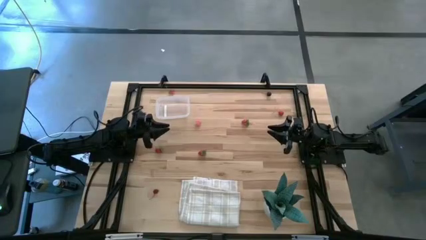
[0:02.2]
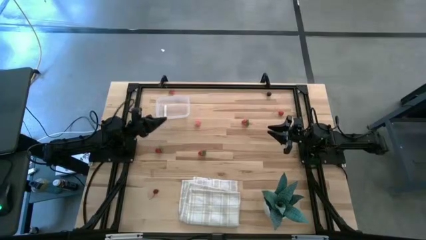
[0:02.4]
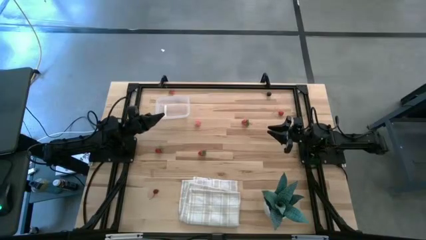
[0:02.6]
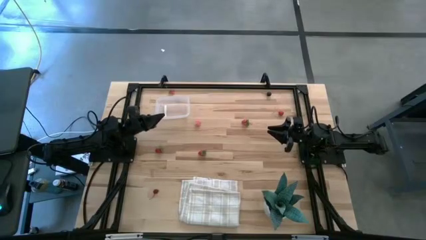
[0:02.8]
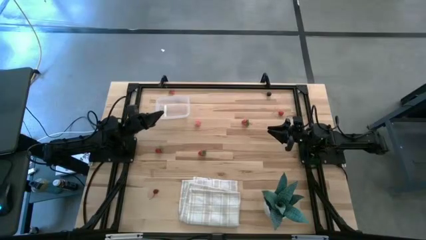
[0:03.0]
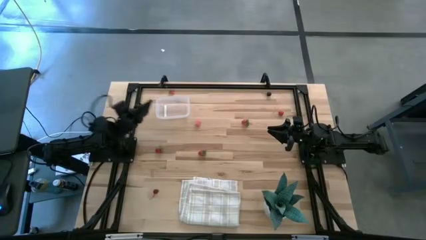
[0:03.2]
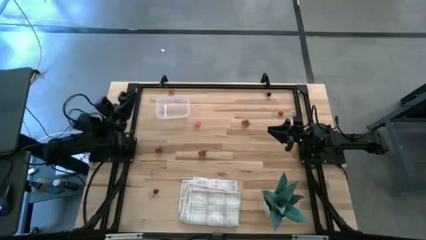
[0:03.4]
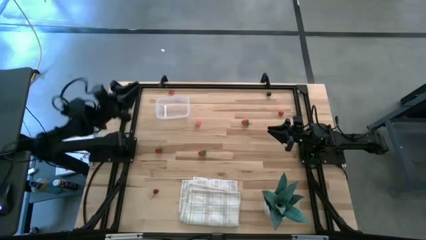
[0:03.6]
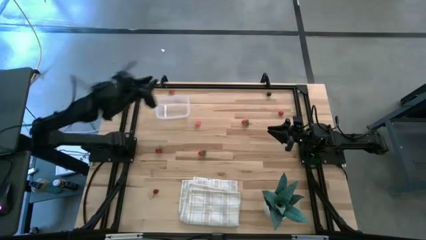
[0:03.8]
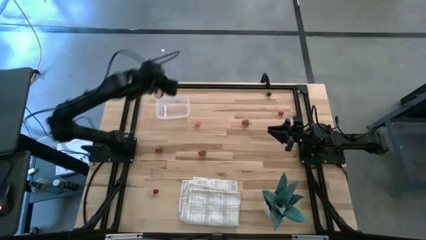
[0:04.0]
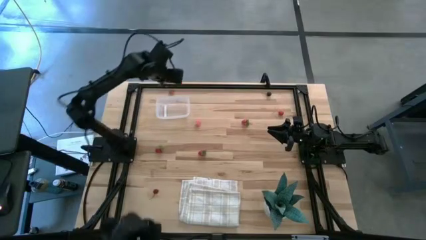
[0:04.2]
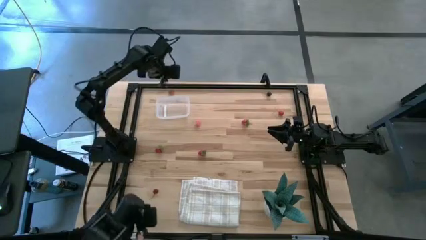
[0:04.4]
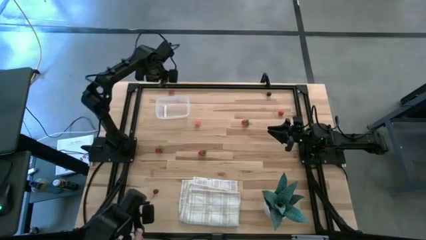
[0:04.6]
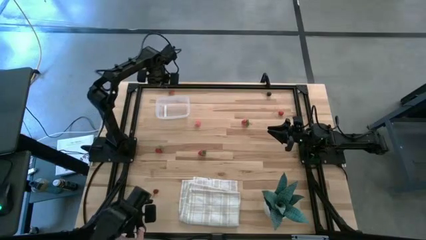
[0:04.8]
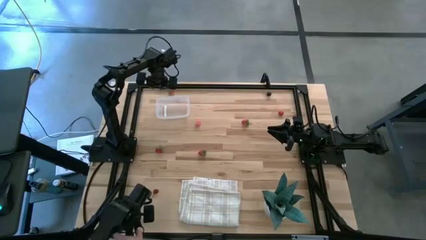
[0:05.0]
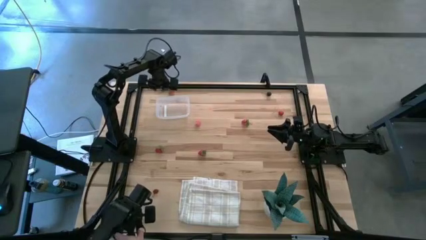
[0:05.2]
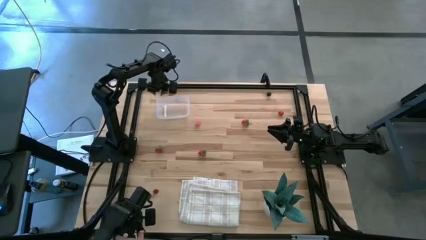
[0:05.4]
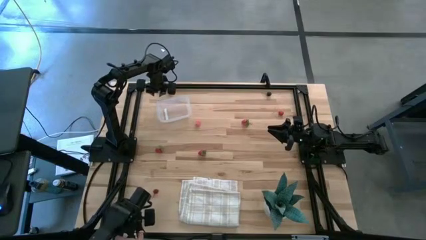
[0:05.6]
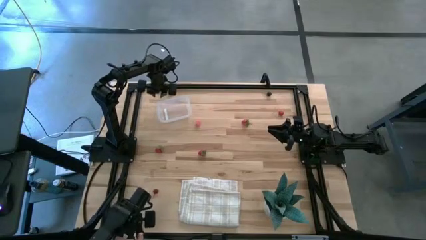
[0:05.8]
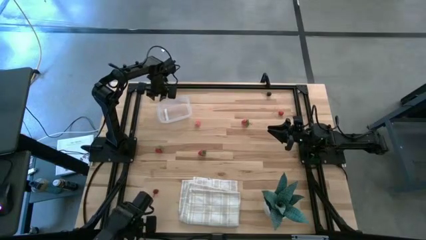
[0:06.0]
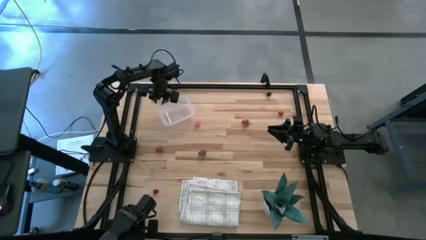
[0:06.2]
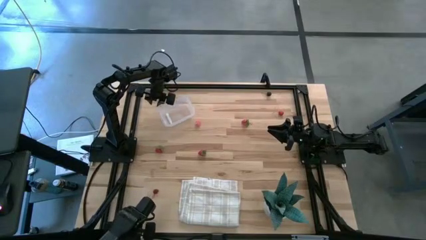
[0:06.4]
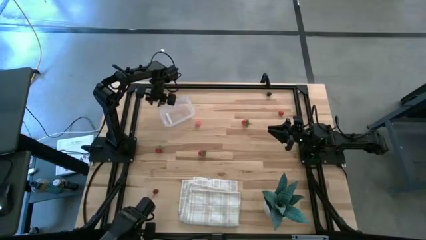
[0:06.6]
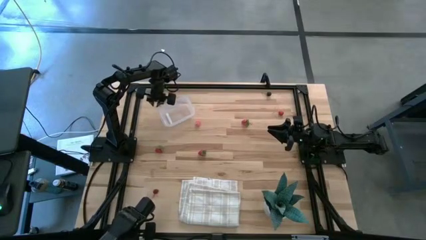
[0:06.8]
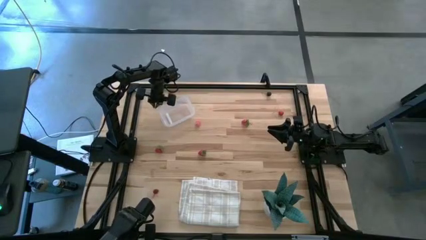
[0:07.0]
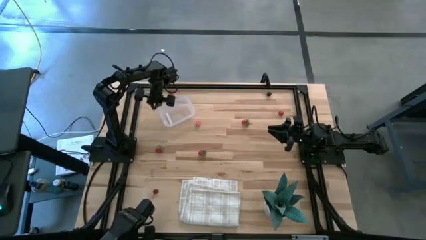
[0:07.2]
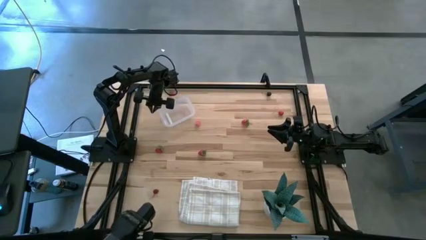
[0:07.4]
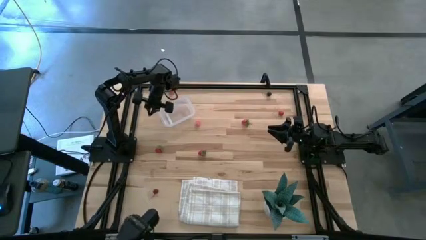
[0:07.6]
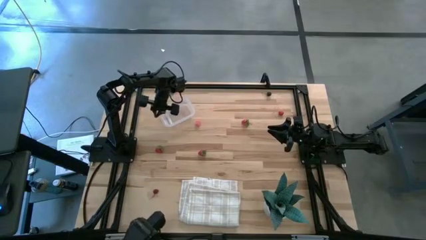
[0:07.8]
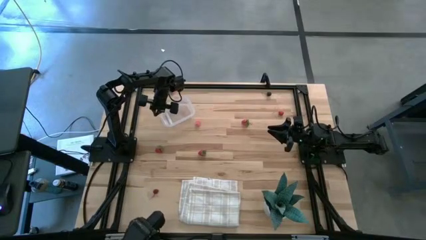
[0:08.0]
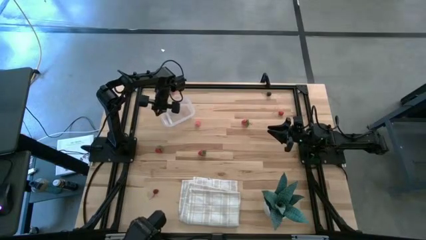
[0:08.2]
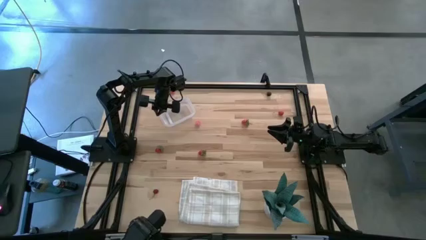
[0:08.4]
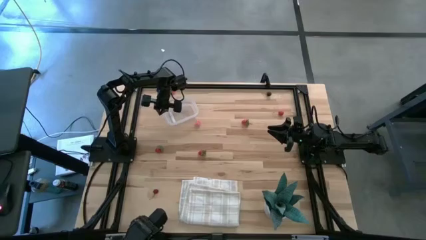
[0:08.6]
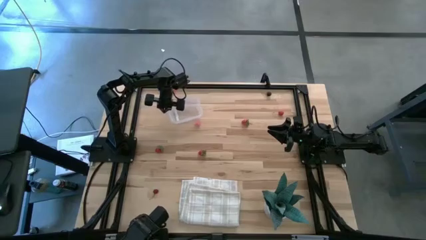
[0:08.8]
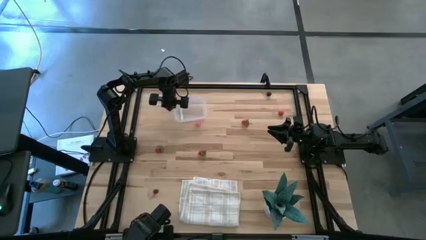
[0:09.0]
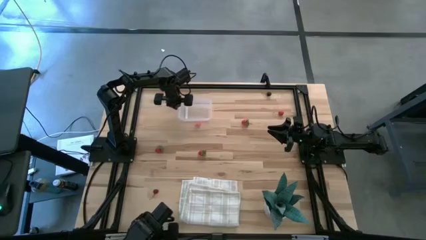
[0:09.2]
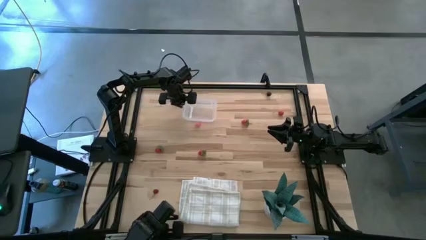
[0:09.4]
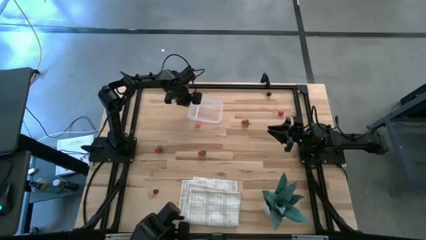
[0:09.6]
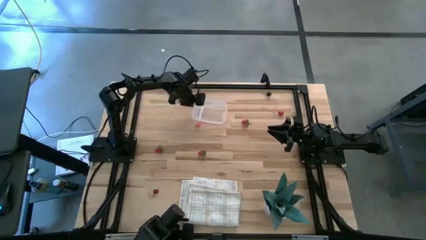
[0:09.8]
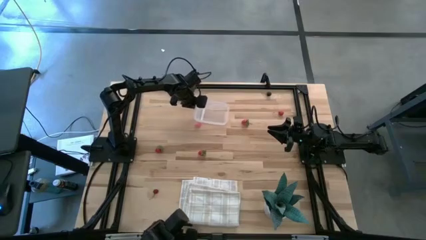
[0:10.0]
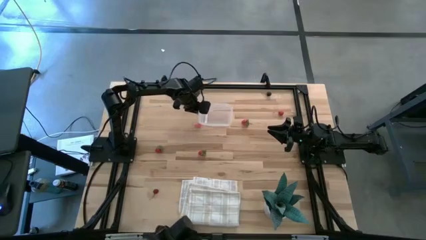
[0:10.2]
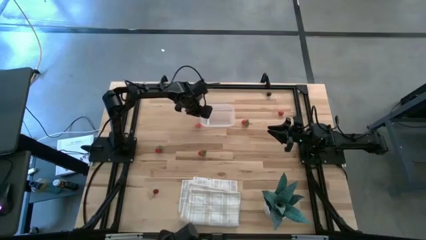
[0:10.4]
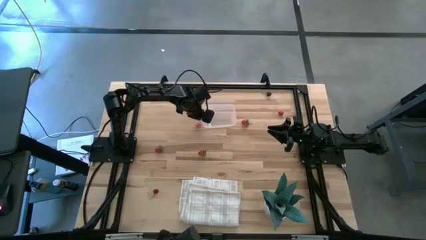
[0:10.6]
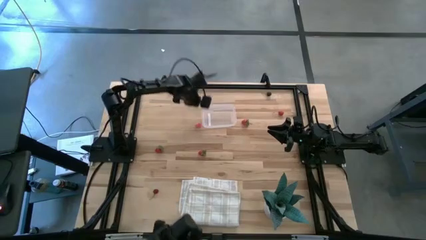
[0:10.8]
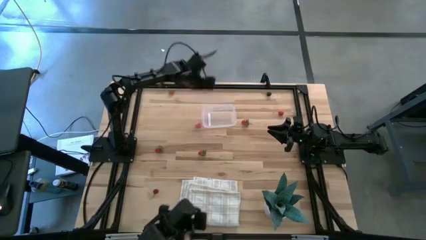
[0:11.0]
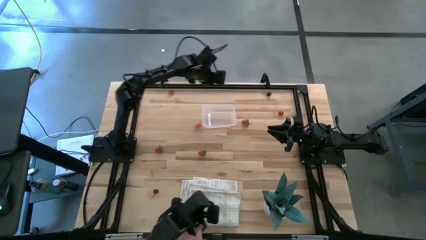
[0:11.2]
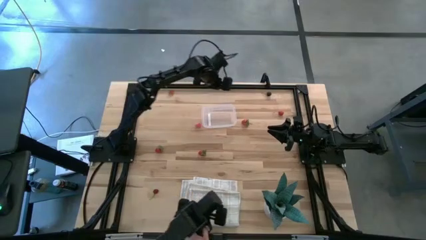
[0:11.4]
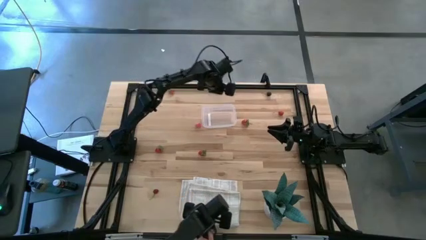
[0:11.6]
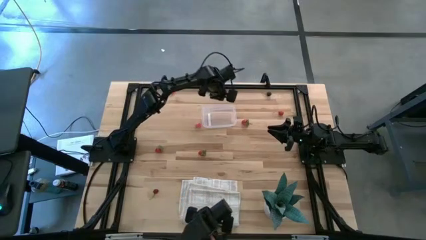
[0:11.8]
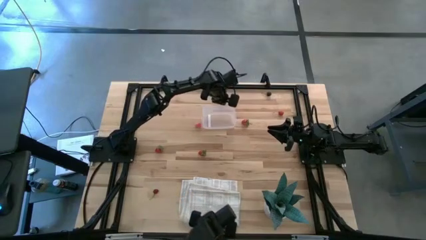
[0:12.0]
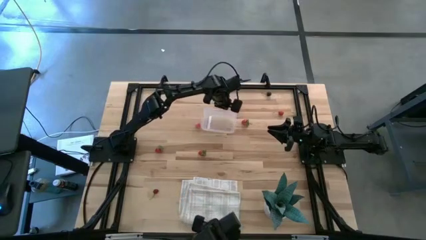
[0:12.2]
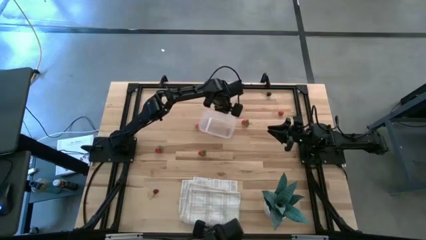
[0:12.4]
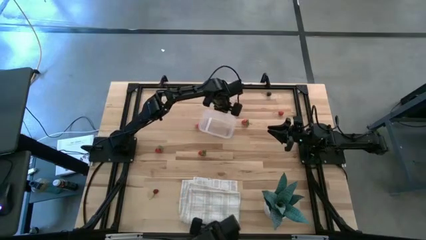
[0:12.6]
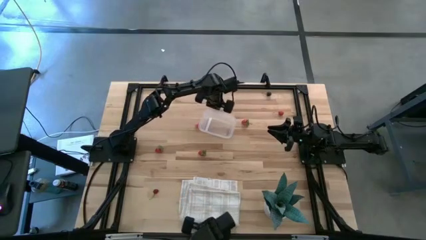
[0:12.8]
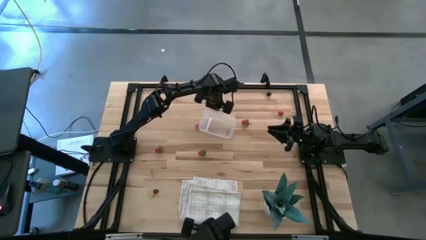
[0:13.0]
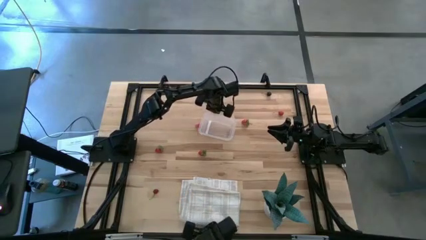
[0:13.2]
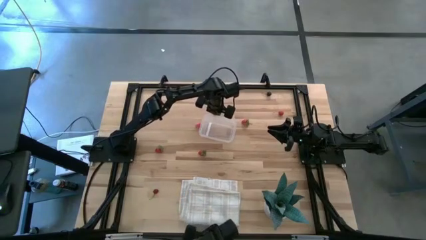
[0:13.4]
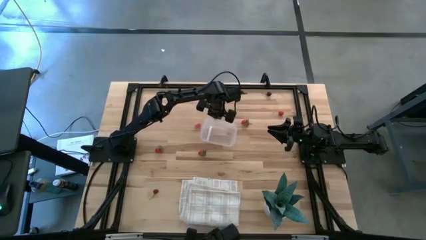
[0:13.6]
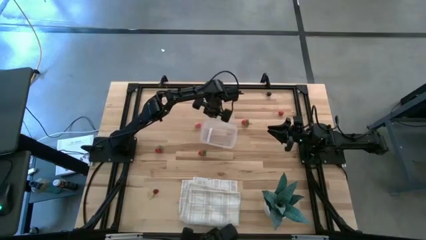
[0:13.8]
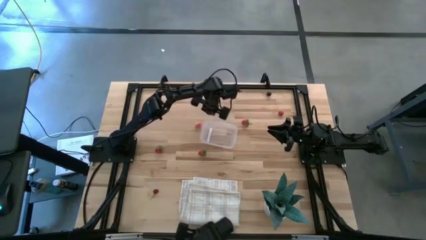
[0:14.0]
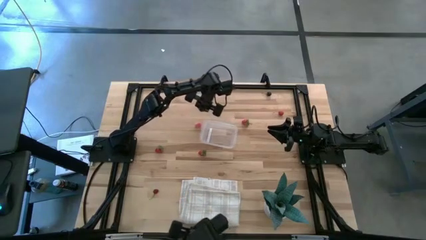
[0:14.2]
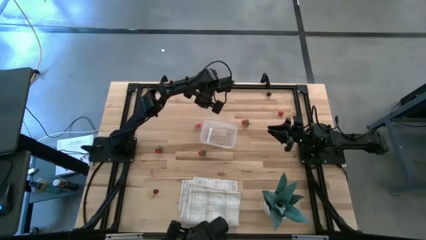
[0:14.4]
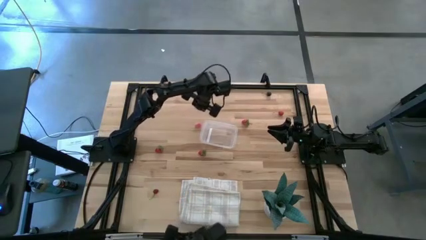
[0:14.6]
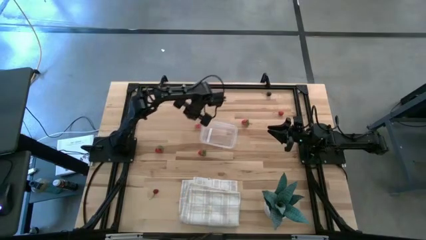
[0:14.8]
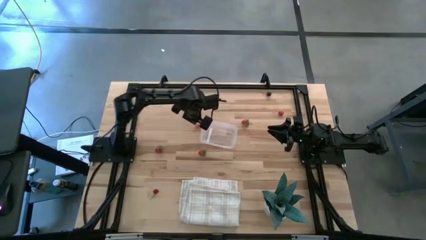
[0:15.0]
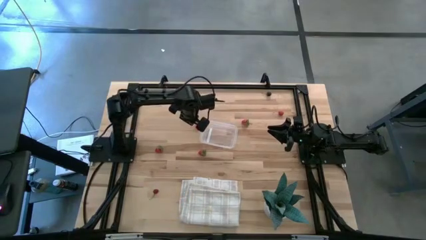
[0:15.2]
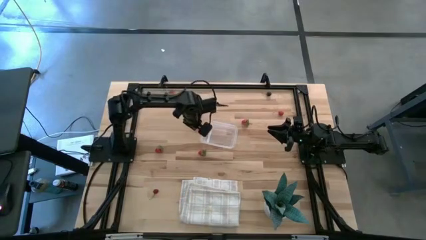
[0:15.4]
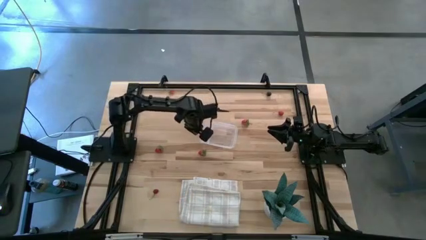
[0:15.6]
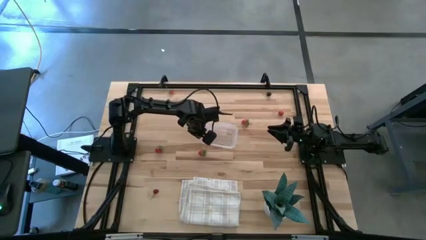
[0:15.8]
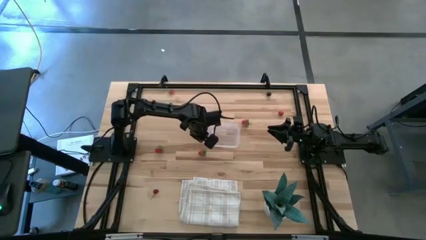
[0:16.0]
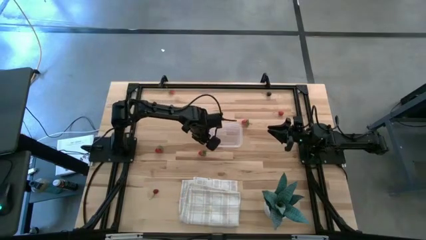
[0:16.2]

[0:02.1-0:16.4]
Task: Pick and placing Produce into tupperware
Move the transparent bin from the top left to the center of the table
